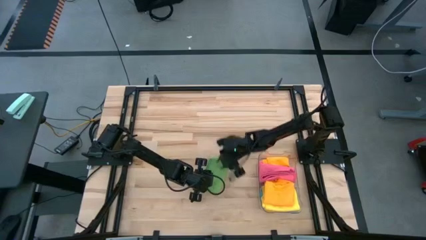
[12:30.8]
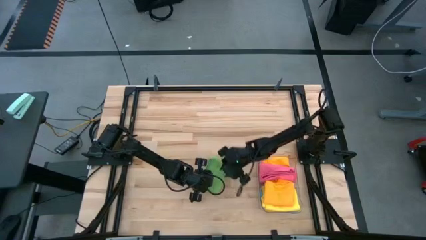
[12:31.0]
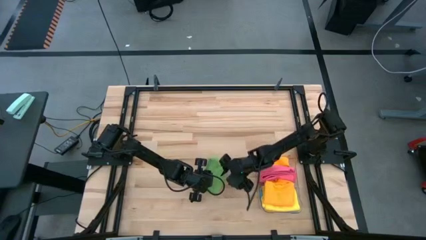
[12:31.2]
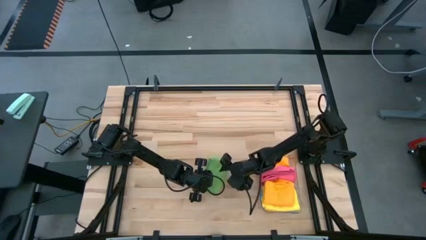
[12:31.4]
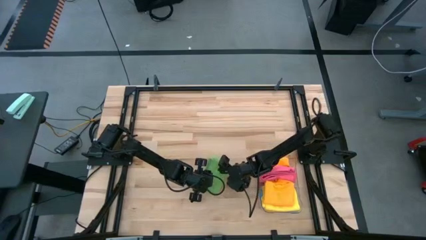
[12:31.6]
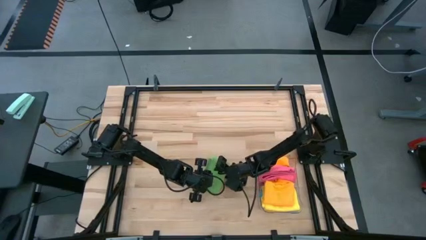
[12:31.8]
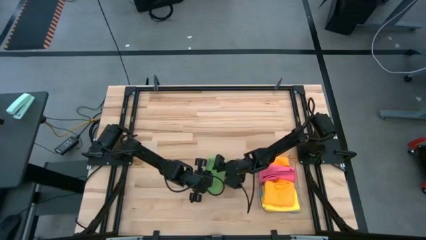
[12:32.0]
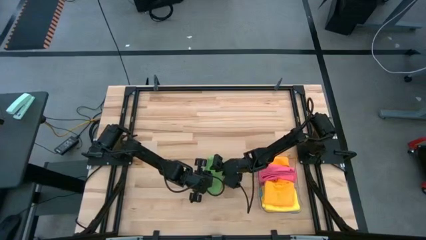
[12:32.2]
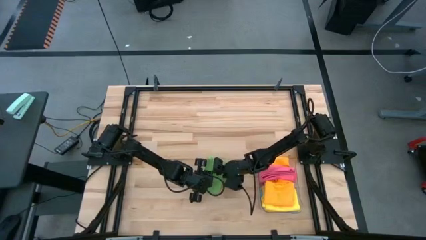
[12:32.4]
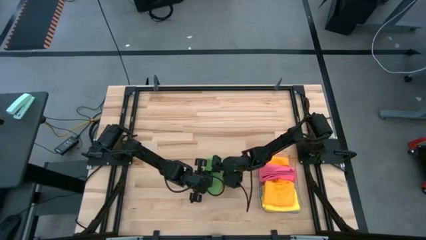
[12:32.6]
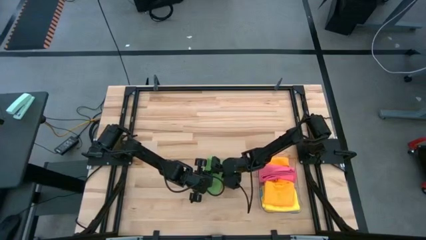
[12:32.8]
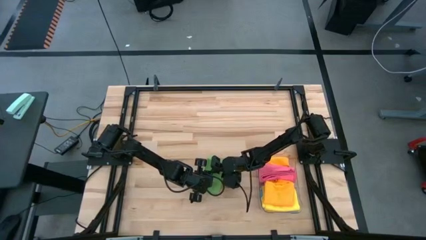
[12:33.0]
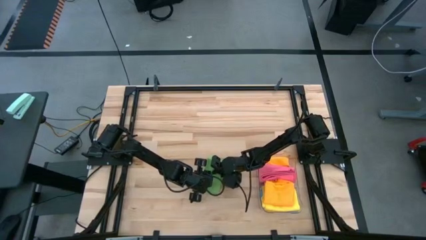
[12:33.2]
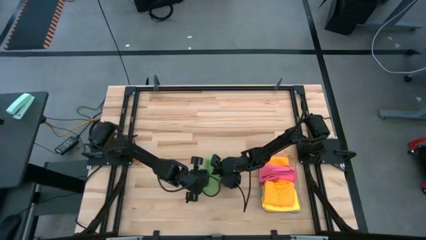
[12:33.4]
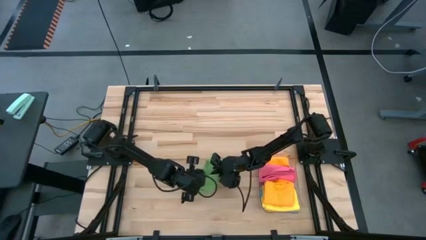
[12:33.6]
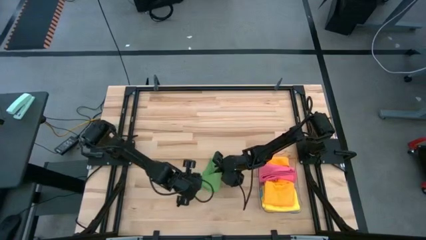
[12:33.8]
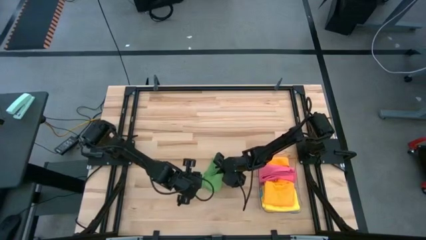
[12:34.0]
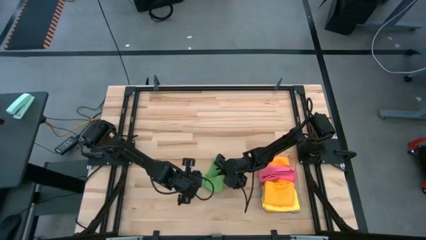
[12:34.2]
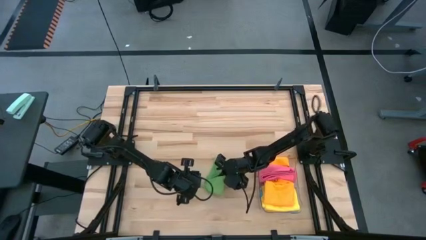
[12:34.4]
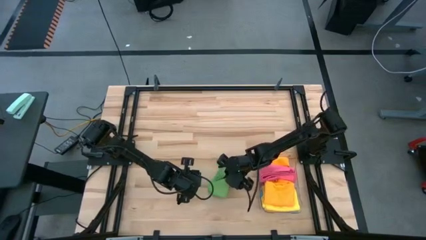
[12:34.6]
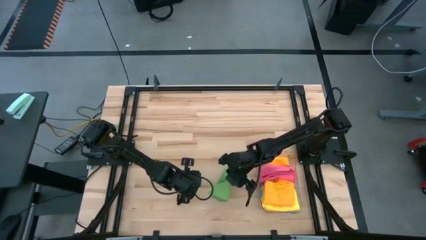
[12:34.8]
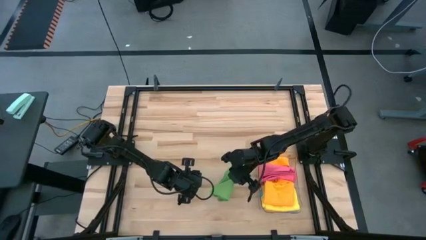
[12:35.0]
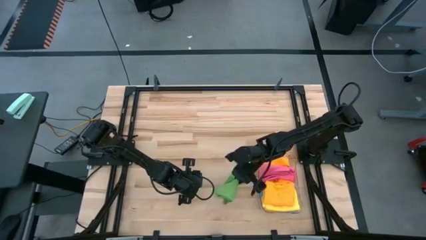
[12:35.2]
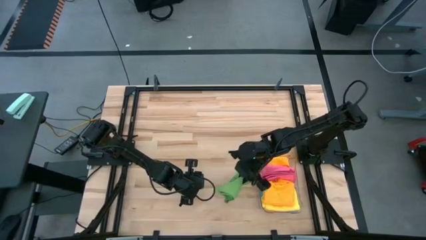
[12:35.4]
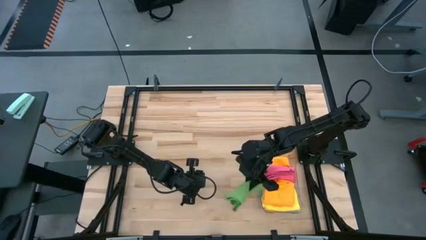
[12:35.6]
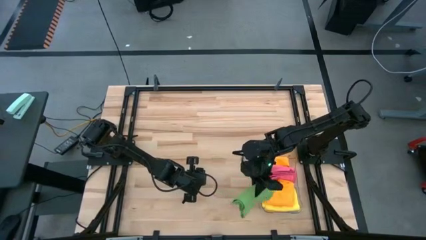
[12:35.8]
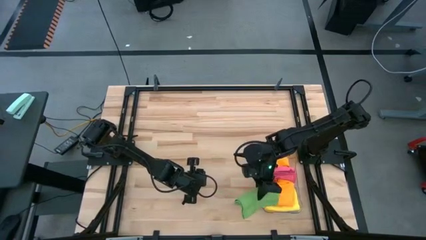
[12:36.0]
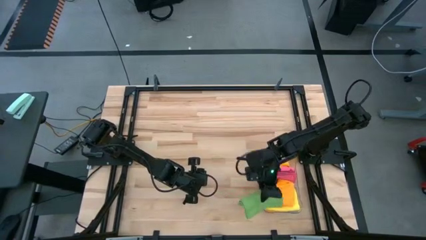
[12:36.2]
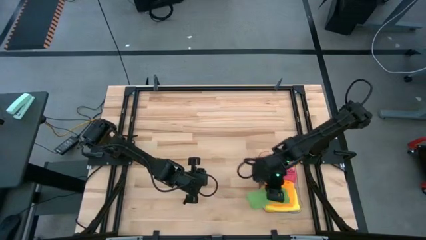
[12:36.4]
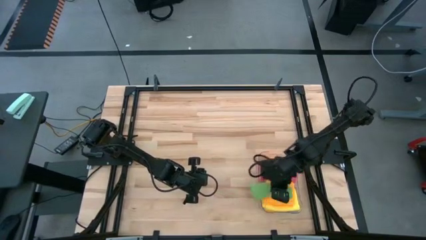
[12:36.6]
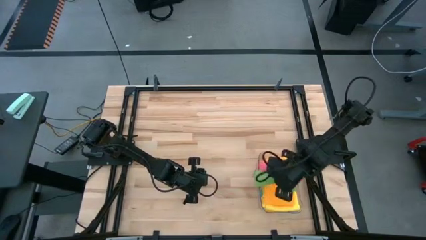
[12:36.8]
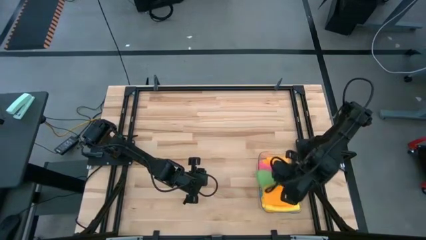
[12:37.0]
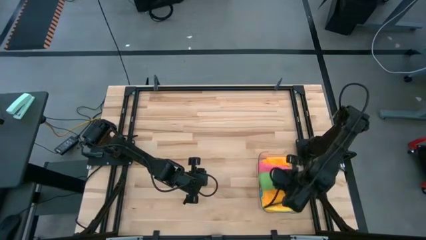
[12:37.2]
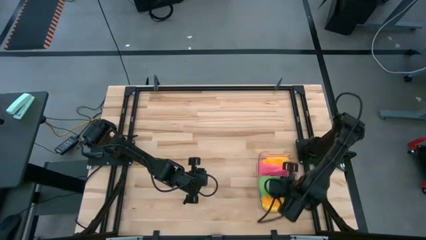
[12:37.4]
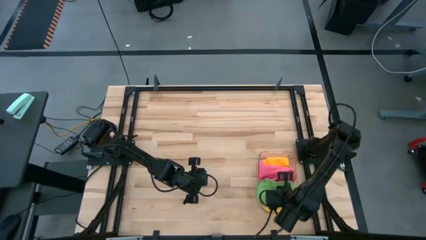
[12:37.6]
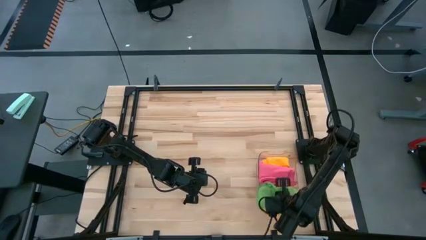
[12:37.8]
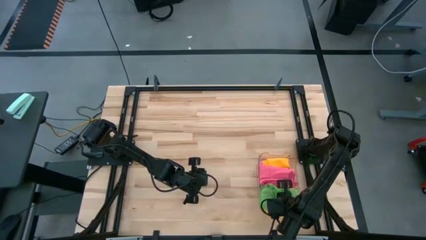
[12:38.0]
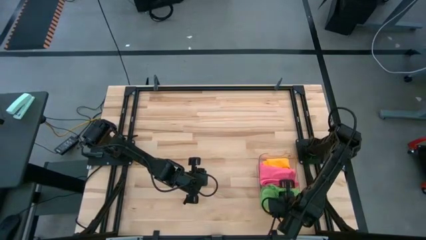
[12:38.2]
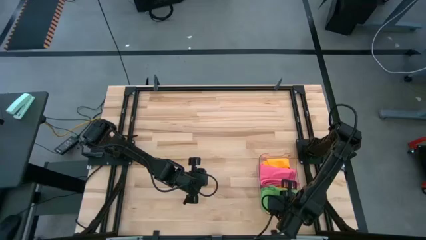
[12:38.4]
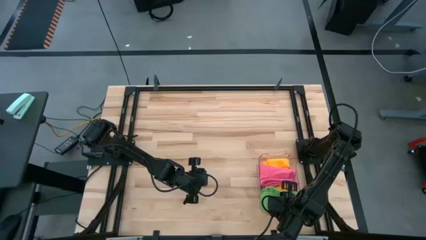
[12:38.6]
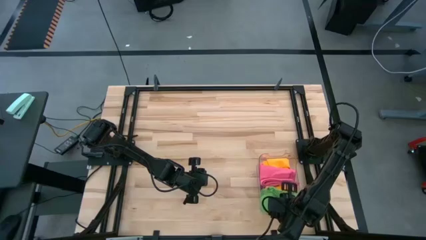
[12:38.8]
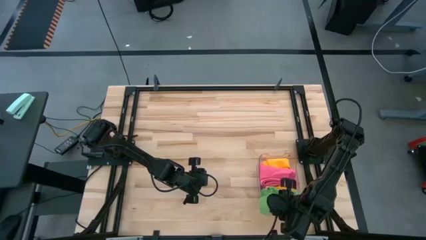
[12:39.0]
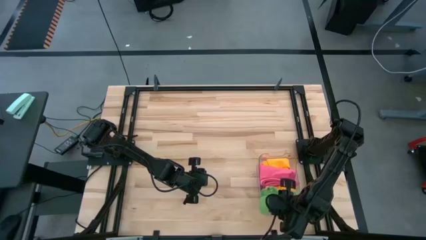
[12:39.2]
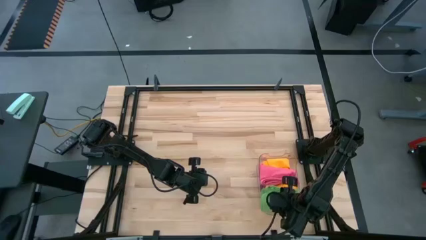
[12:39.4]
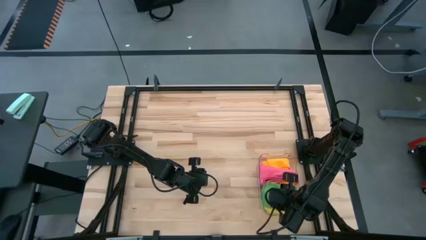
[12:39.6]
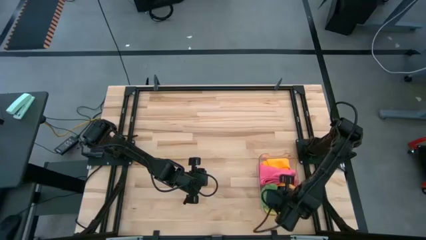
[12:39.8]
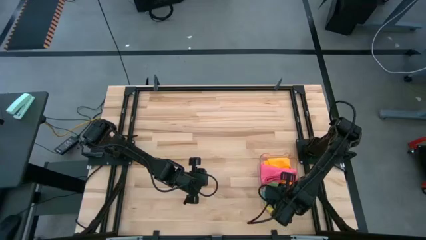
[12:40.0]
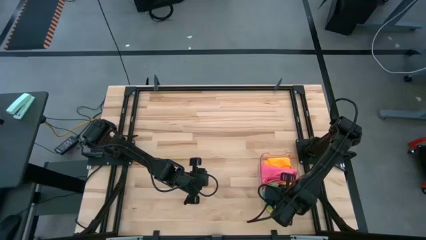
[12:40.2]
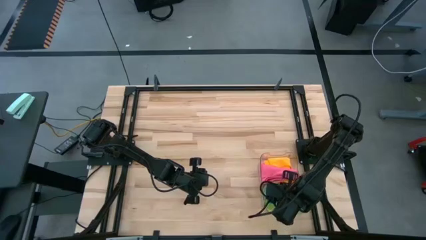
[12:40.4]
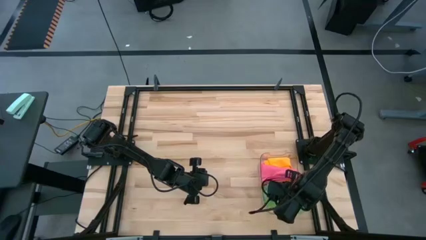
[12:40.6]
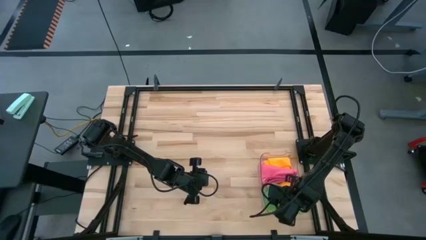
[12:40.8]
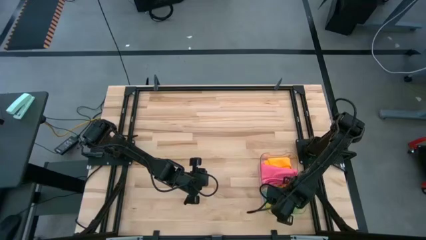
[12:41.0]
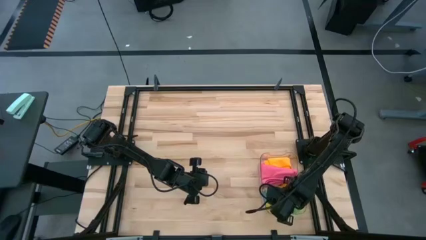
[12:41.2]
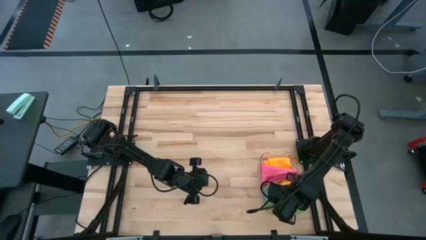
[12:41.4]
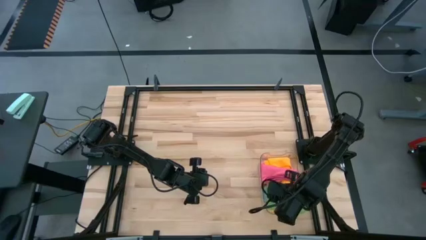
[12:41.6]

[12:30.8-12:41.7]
Task: Fold microfiber towels
Put the folded green towel into the transparent bin

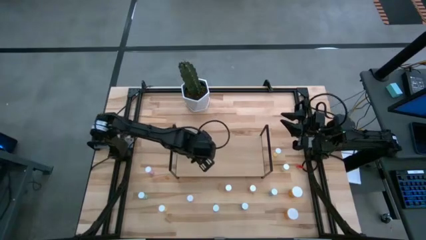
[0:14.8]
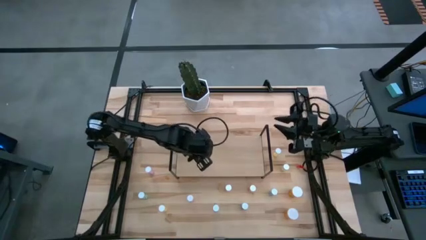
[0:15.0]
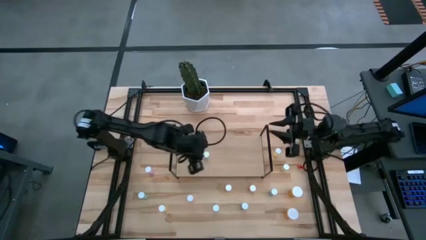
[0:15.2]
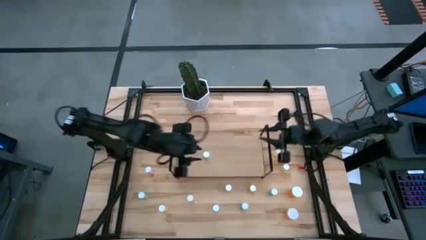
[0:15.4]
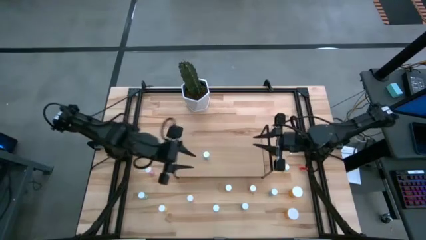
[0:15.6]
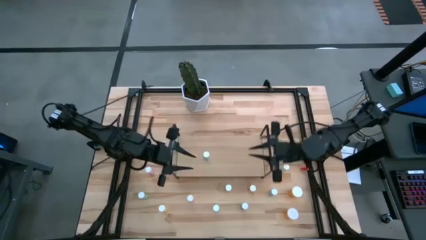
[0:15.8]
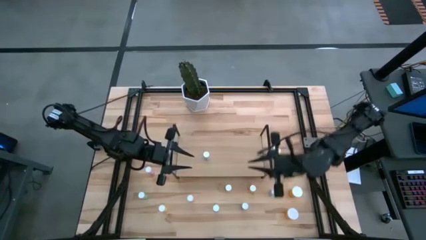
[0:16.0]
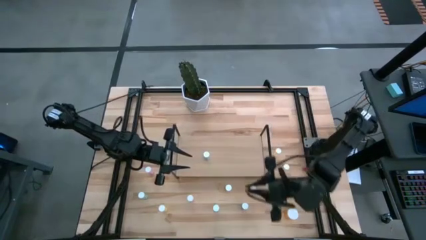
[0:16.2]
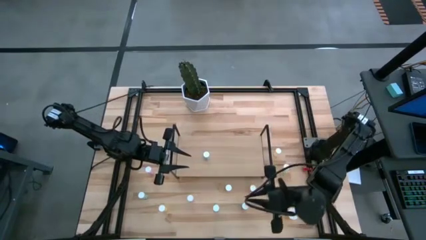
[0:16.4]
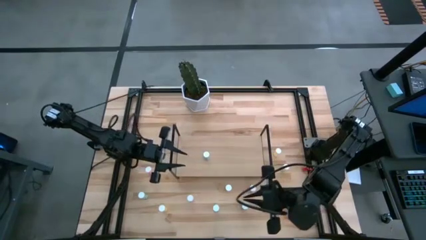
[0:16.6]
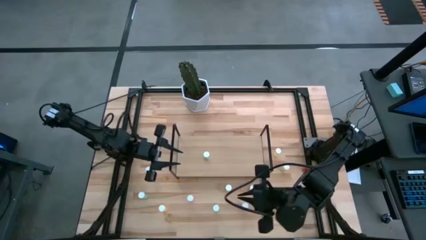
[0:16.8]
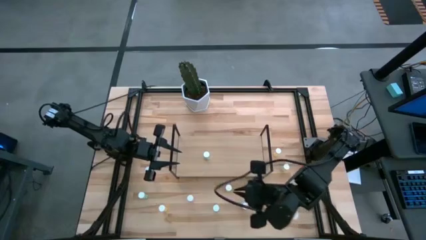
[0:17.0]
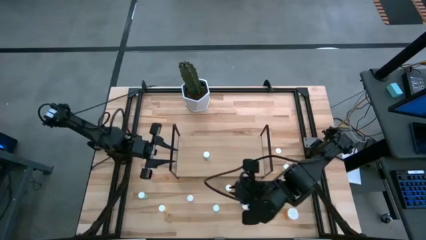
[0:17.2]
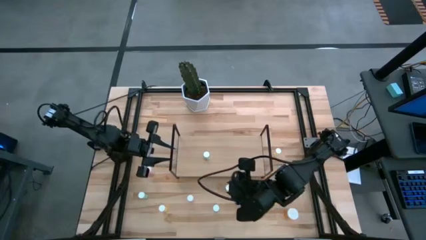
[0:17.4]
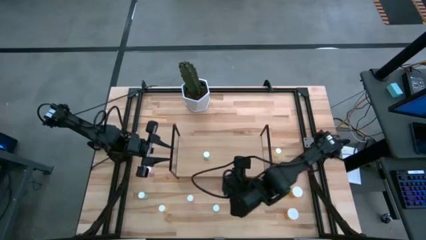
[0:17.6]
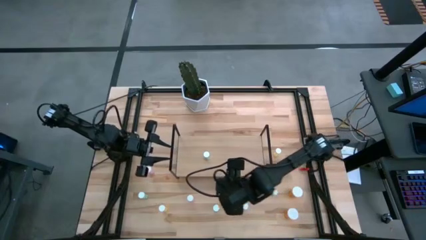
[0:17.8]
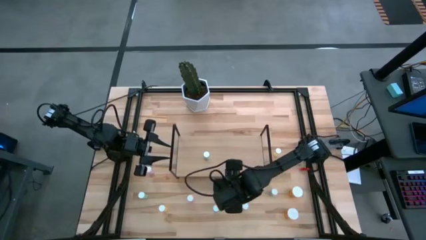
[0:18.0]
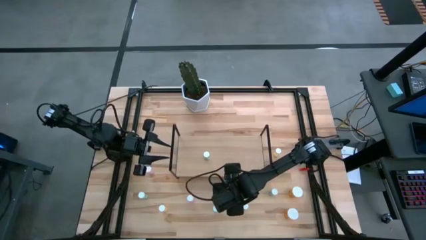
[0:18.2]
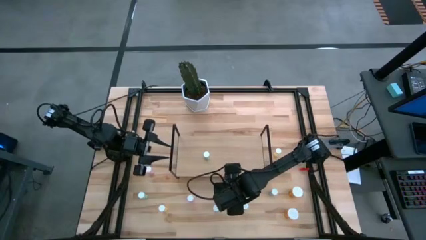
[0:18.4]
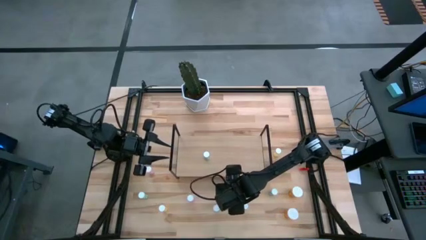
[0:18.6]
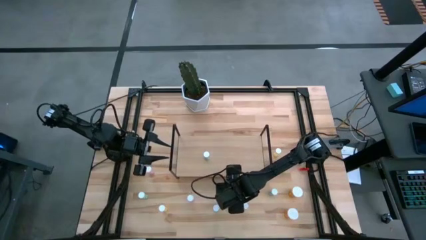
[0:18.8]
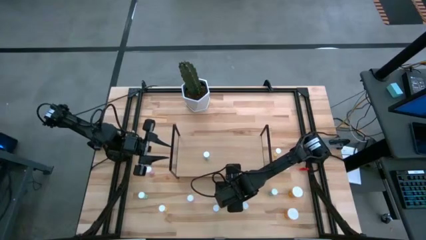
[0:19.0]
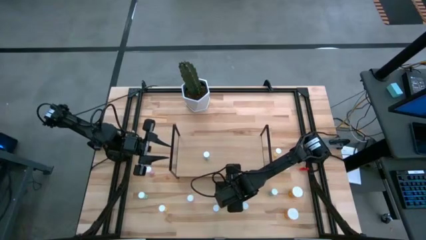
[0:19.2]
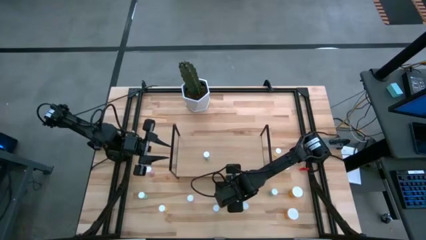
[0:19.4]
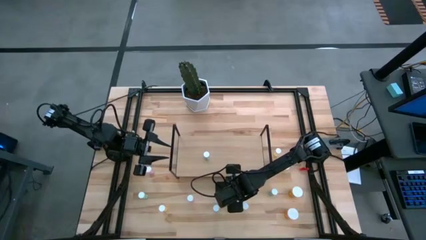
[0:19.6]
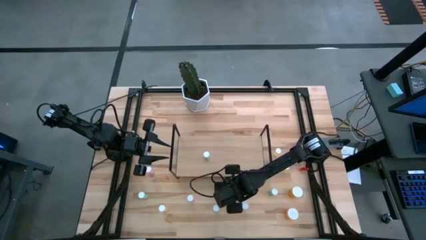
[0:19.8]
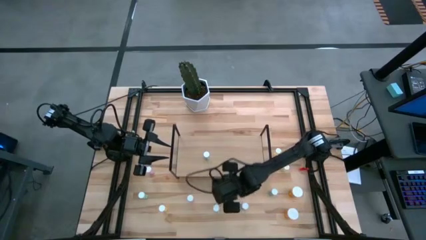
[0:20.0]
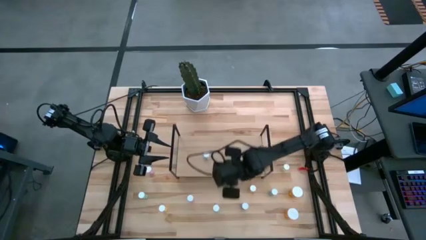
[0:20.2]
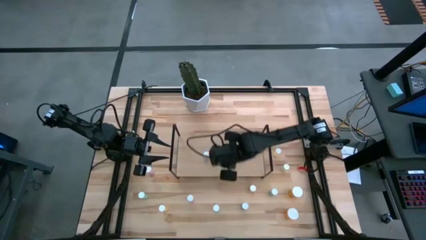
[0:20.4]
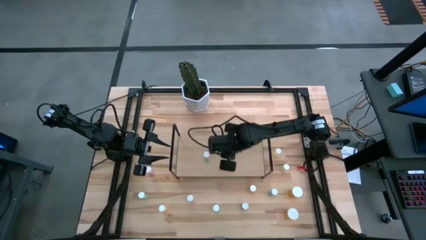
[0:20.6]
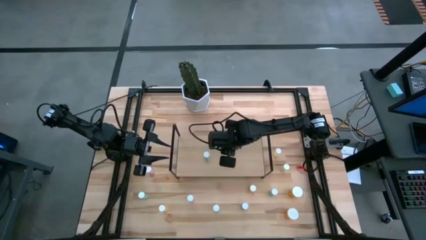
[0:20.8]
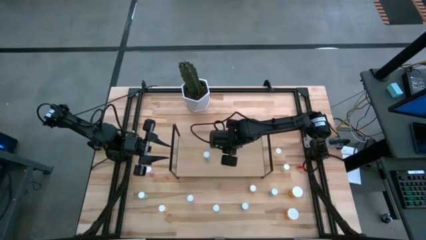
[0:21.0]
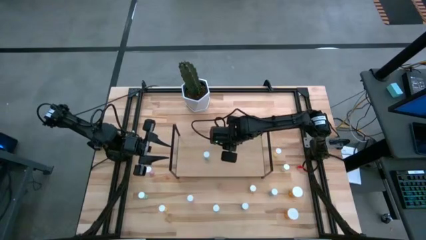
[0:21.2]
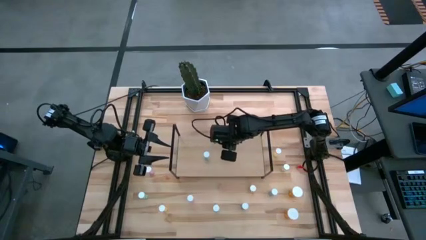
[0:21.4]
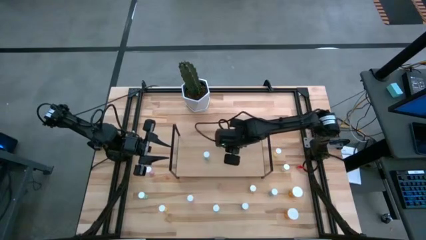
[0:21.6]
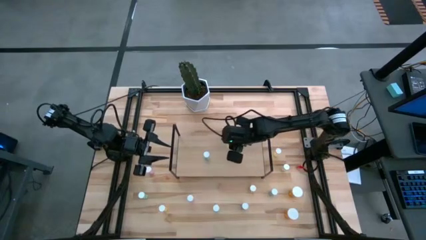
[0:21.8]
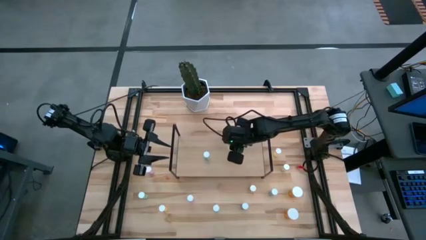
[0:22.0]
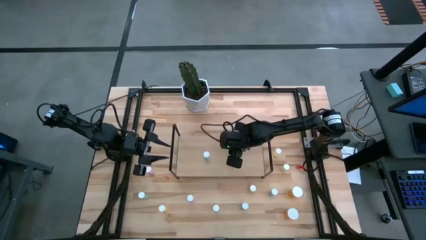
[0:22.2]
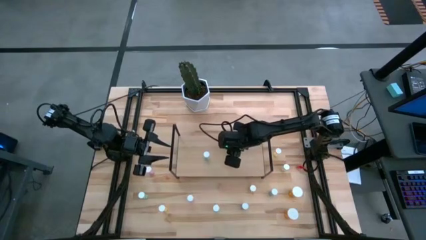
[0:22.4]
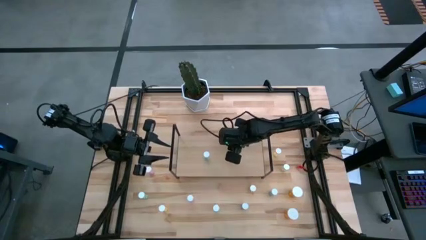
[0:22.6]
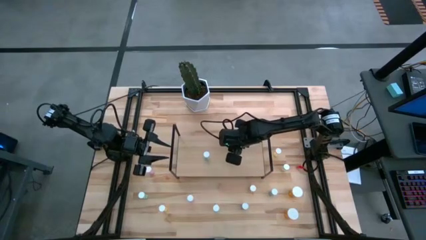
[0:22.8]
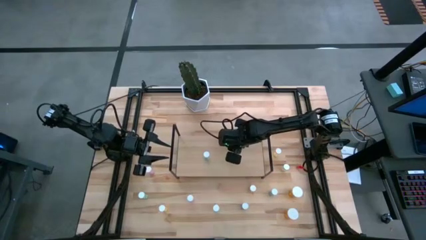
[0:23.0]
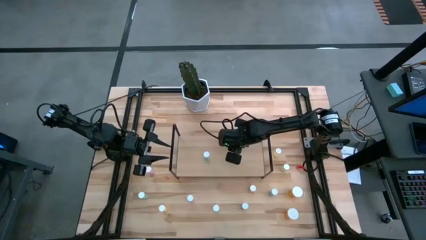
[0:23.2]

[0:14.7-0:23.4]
Task: Pick and place medicine bottles onto shelf by color
Put the yellow pill bottle on the shelf
